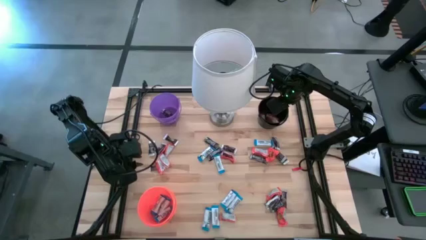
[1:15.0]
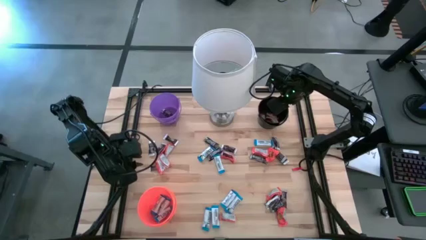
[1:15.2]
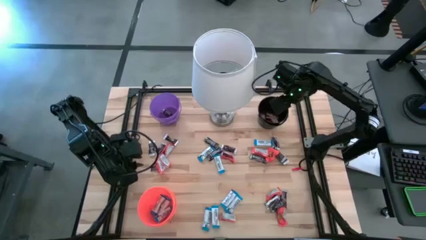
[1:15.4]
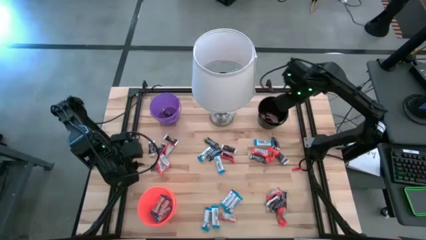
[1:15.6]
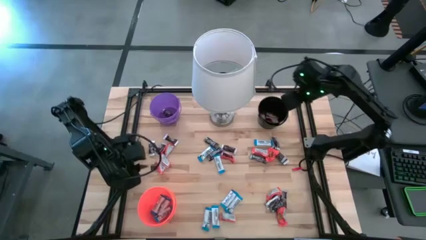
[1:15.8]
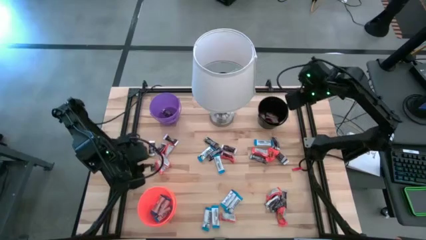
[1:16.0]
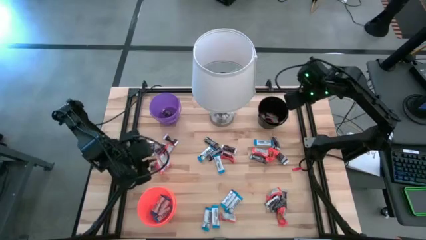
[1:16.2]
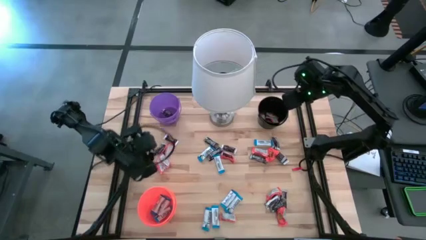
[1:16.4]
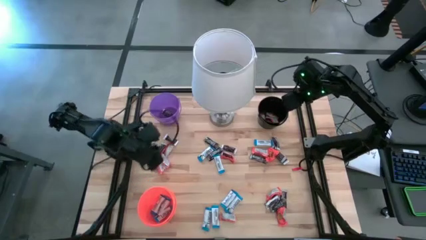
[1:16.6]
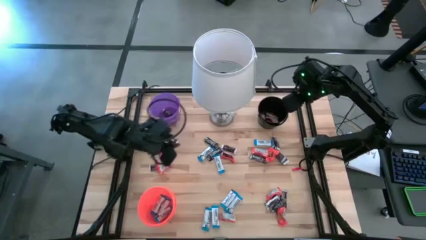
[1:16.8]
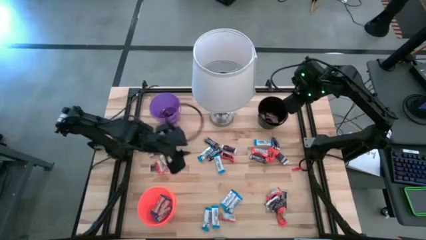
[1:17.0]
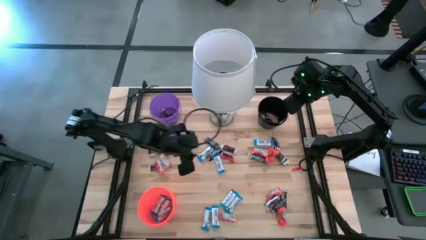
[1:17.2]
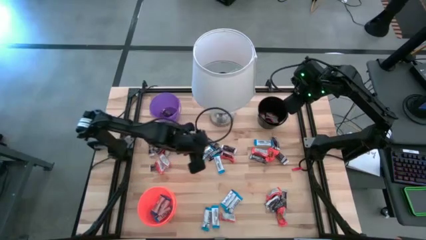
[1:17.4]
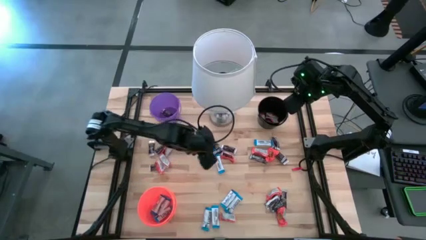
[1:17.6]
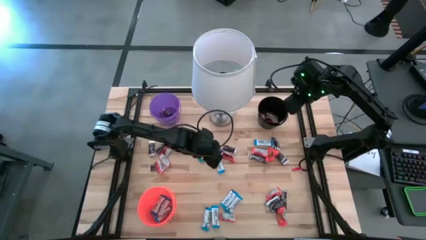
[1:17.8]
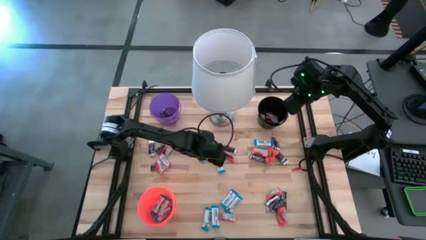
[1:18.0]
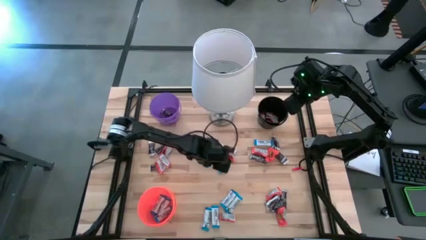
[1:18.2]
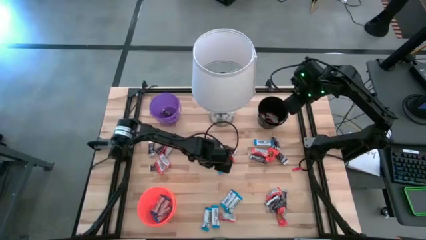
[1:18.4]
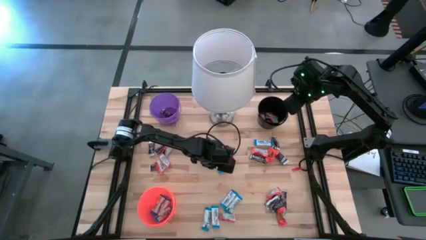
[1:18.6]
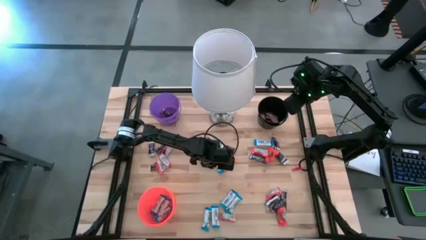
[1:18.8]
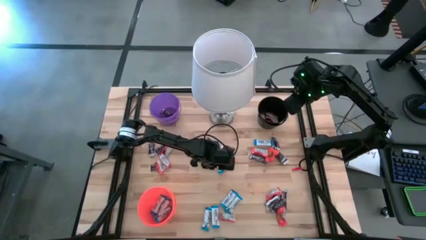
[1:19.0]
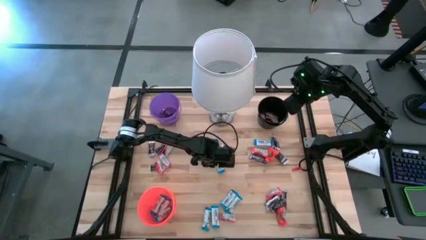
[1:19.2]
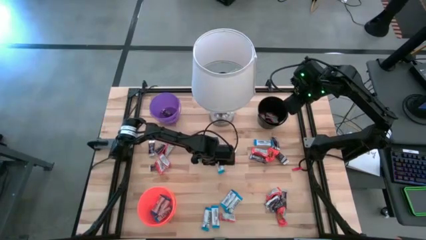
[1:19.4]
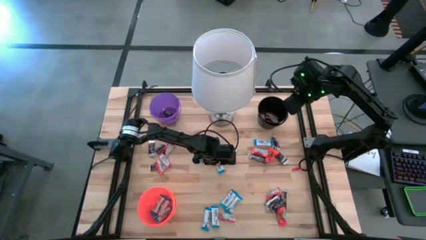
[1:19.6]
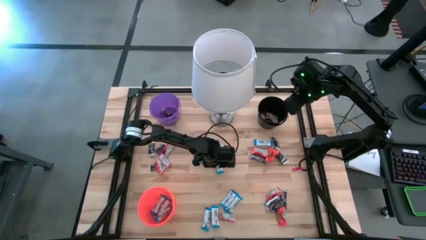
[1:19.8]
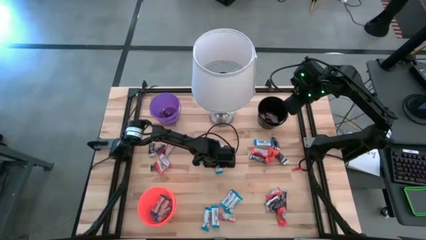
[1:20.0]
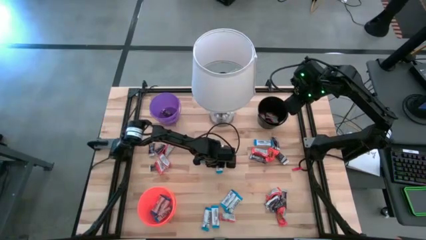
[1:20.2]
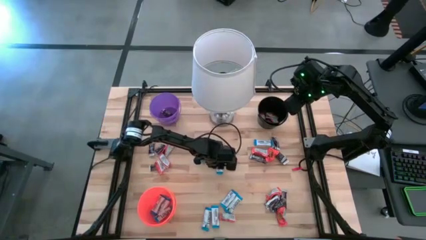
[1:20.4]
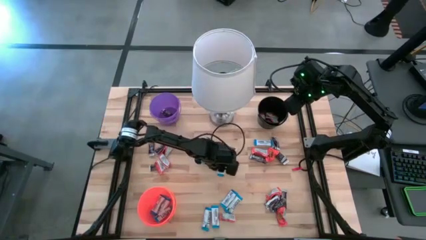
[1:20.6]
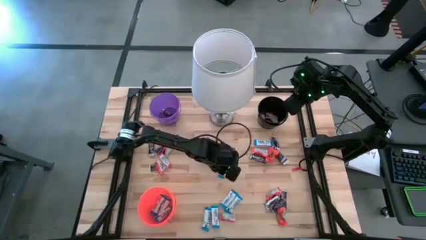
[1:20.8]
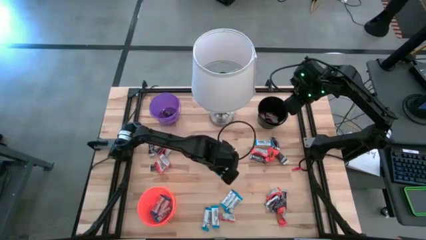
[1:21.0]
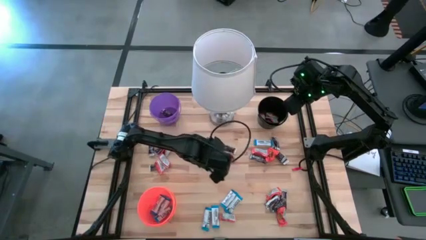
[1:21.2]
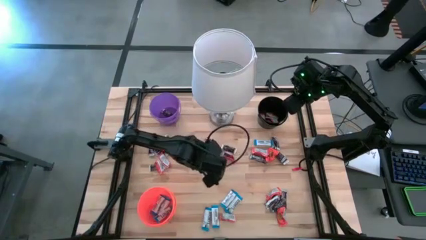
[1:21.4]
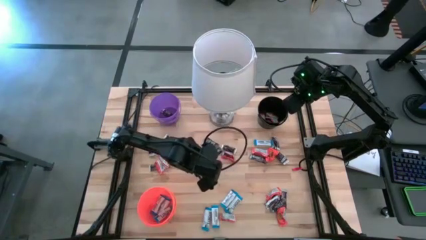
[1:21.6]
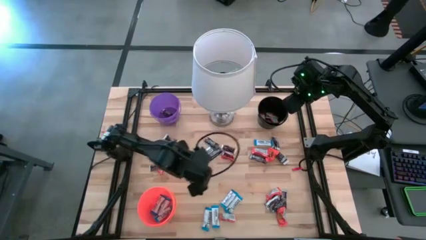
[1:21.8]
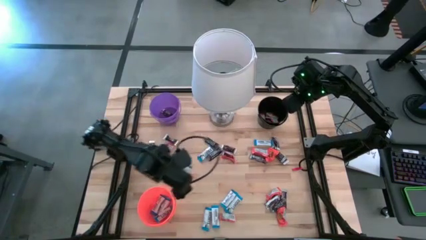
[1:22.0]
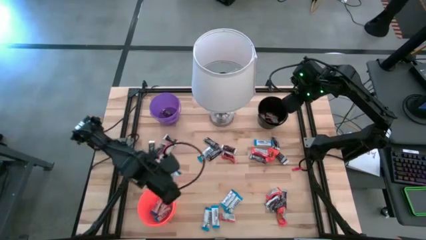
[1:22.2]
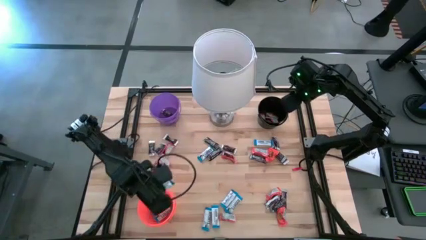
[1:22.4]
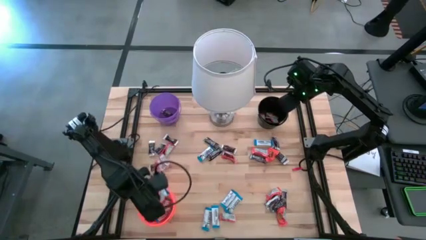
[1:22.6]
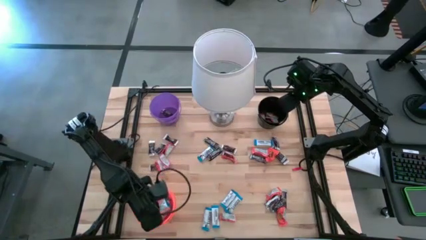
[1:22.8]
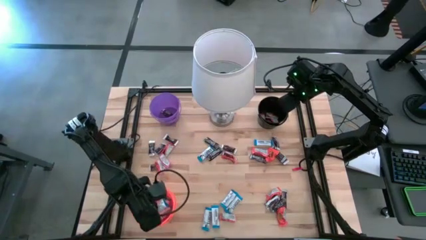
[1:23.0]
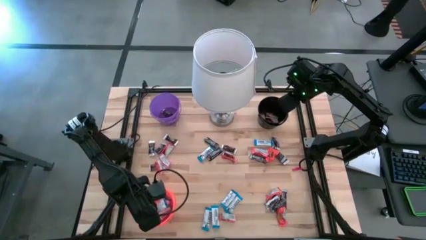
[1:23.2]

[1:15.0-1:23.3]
Task: Organize candy in baskets
Put the white chocolate bar into the orange bucket

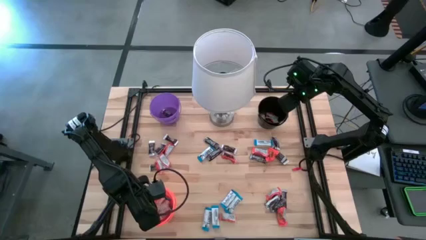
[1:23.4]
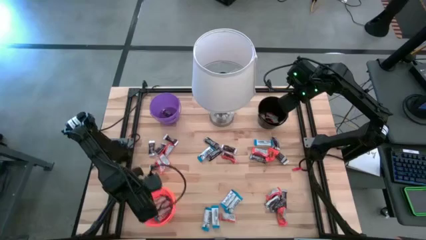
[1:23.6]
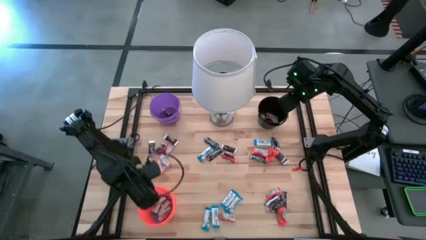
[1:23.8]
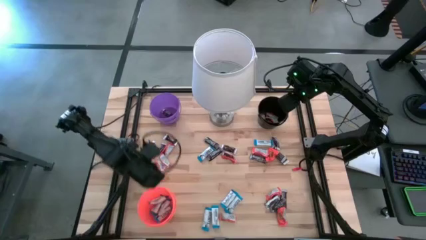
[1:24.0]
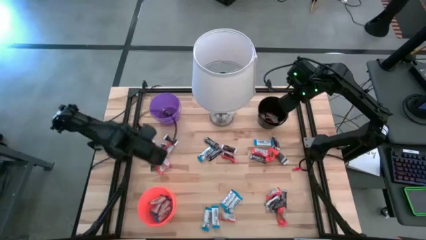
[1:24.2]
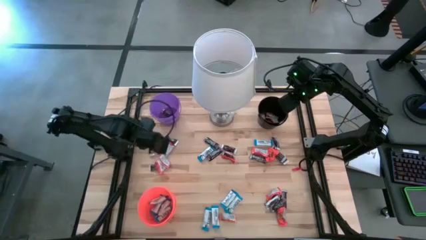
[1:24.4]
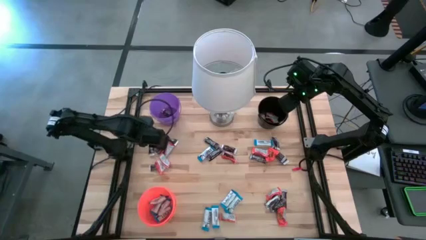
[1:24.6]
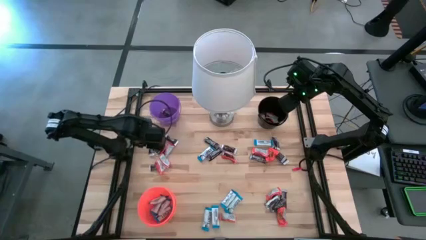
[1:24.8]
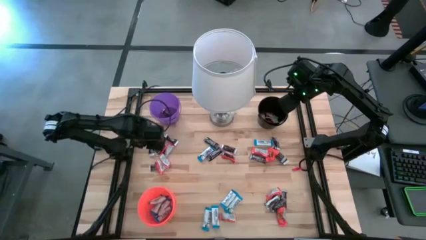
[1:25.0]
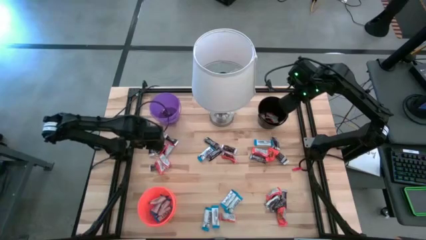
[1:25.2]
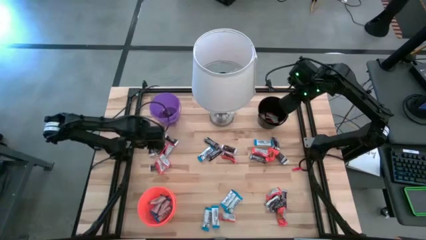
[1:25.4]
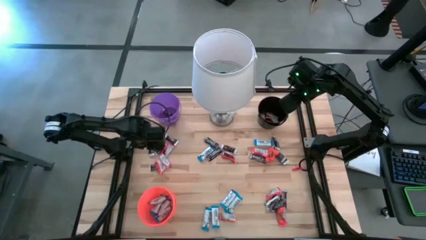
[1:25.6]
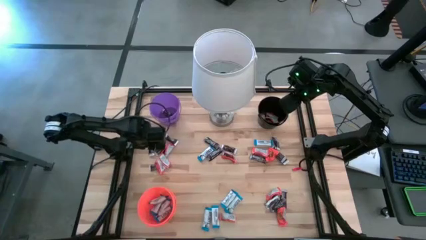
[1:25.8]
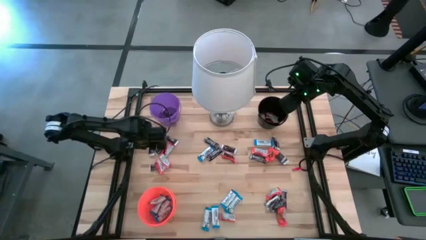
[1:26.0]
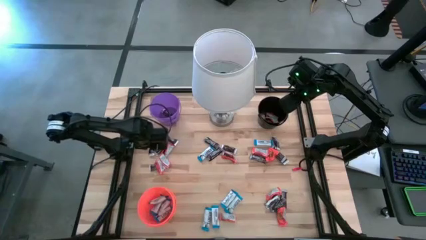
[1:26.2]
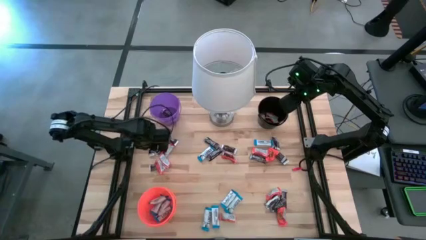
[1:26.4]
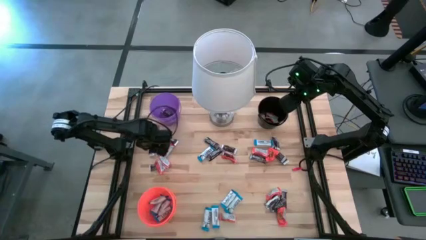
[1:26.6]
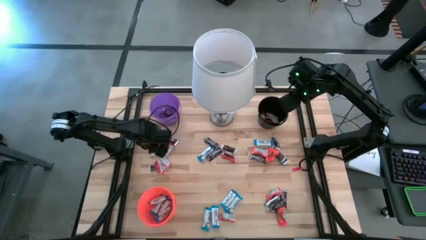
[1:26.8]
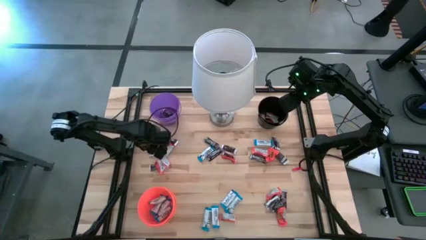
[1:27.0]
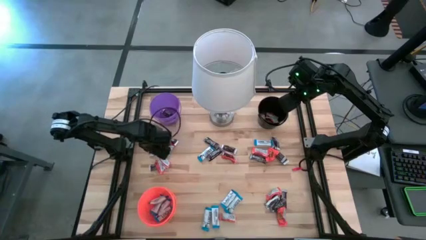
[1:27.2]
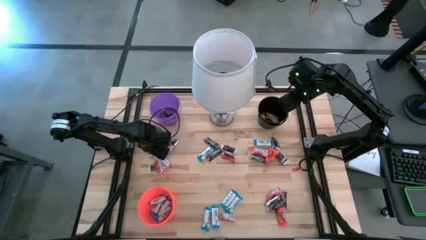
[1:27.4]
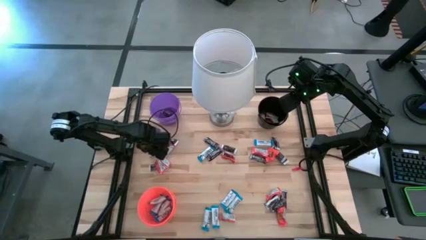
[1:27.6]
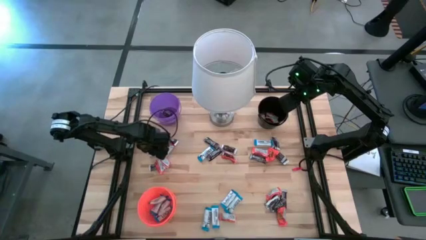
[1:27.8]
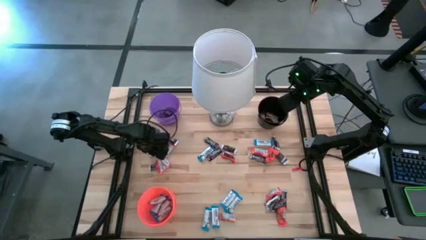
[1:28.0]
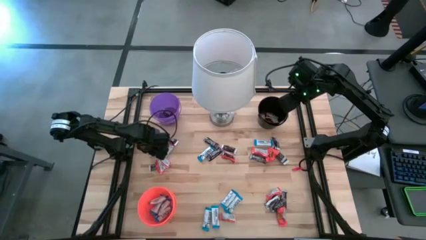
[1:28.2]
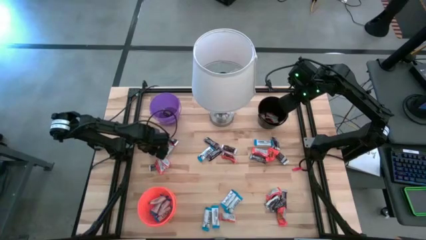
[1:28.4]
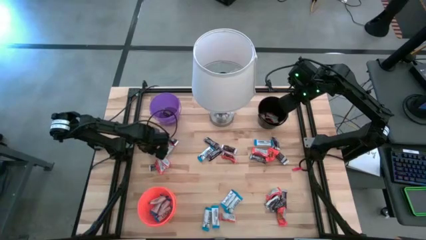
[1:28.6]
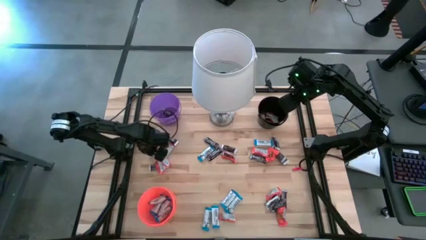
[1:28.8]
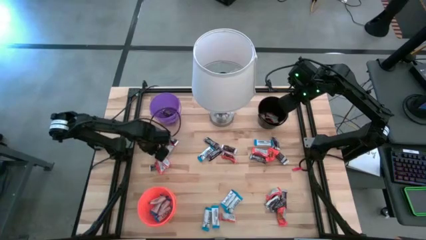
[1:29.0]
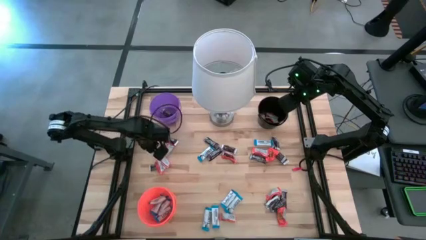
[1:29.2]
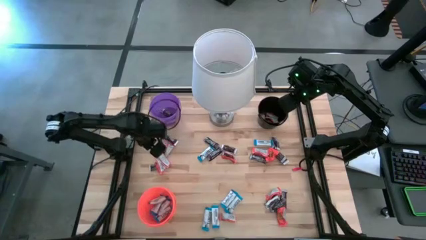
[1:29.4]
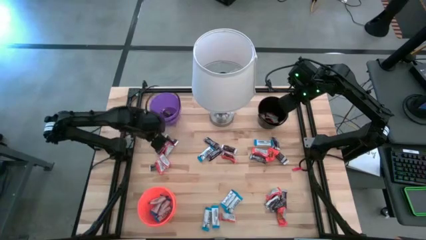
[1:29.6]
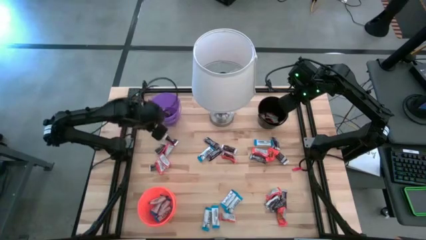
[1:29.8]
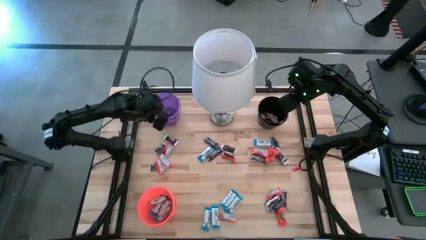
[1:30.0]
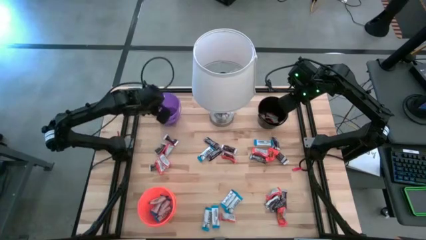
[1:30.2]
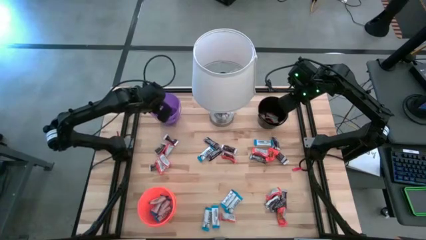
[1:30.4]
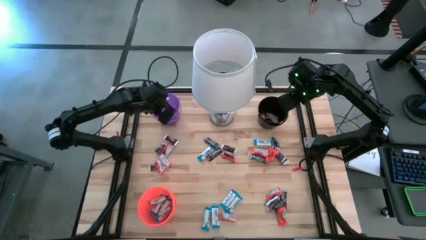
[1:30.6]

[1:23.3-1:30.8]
Put the brown chocolate bar into the purple bucket
